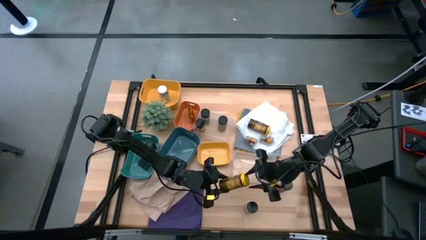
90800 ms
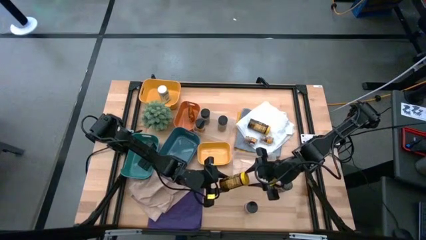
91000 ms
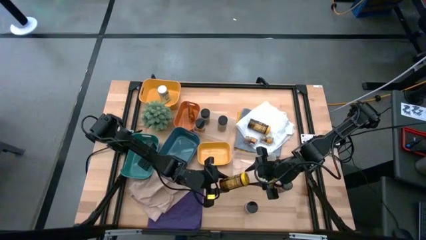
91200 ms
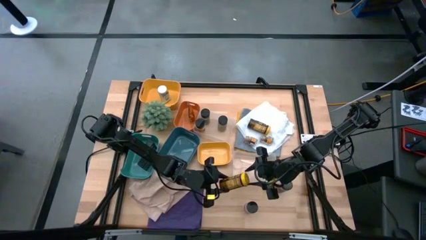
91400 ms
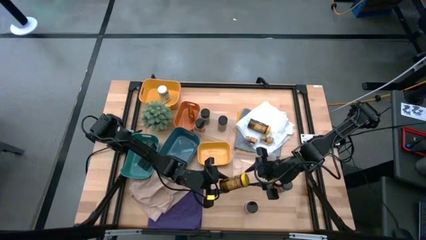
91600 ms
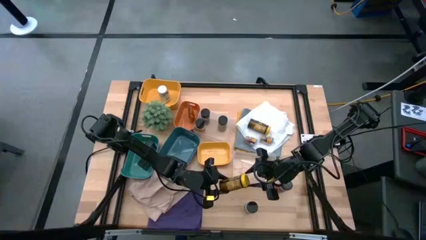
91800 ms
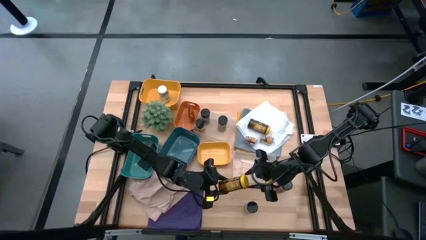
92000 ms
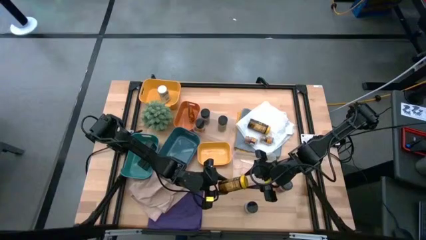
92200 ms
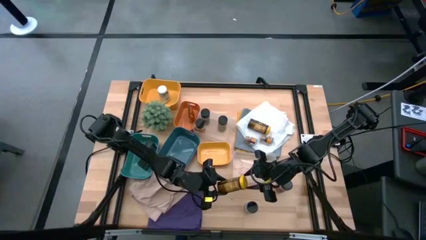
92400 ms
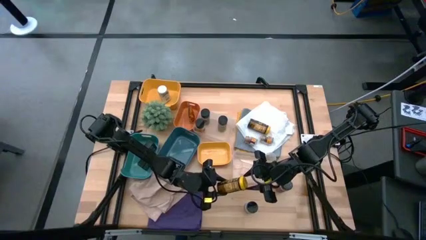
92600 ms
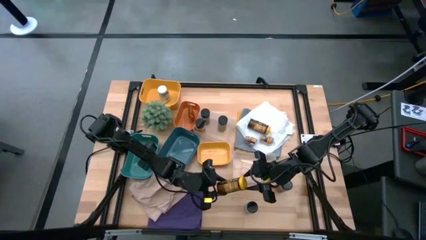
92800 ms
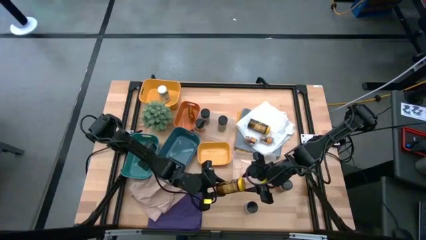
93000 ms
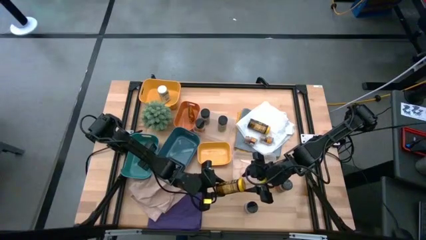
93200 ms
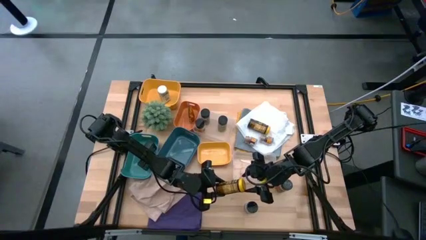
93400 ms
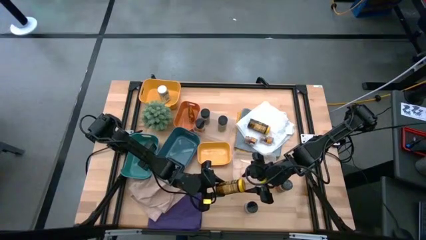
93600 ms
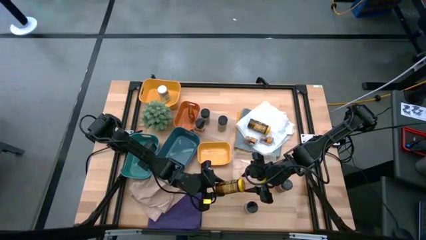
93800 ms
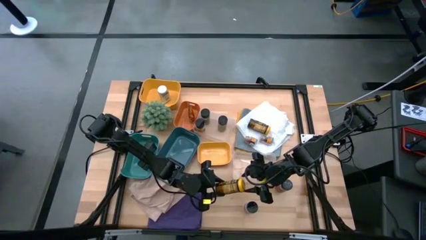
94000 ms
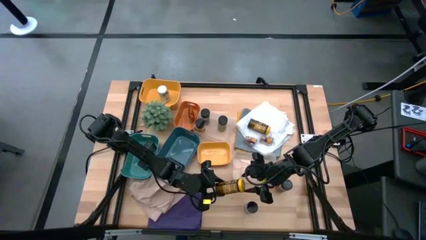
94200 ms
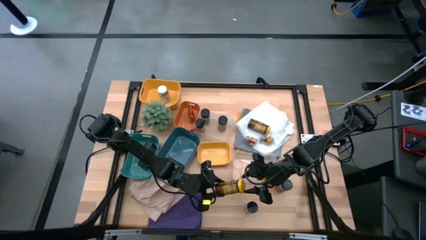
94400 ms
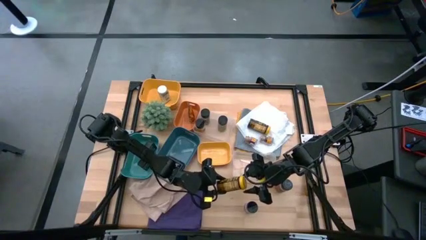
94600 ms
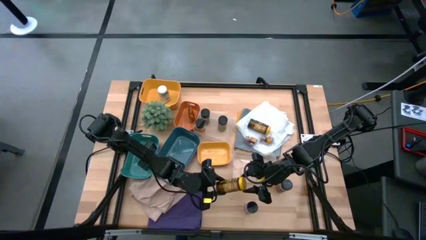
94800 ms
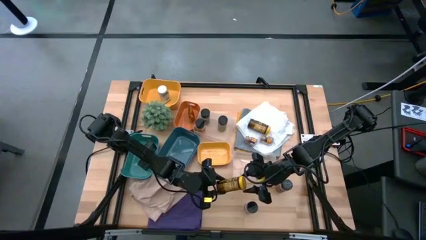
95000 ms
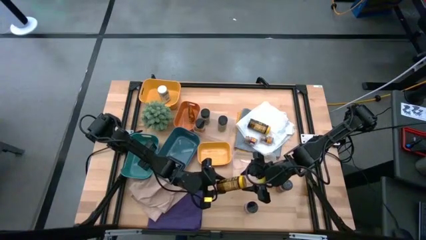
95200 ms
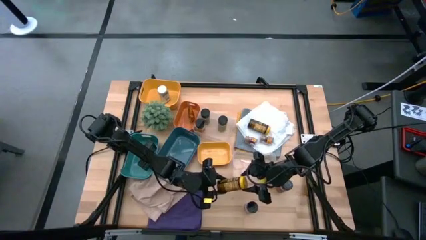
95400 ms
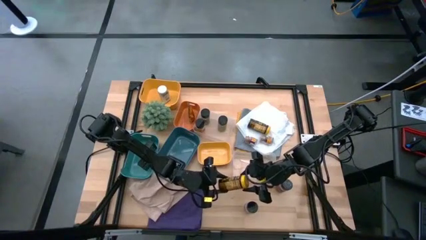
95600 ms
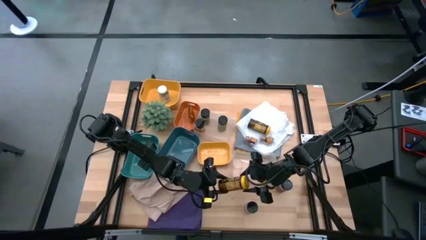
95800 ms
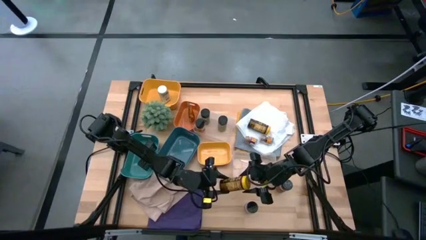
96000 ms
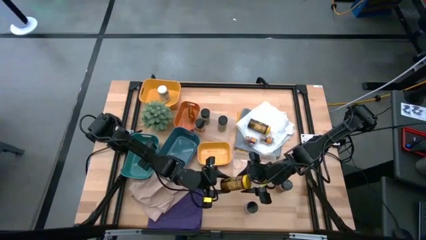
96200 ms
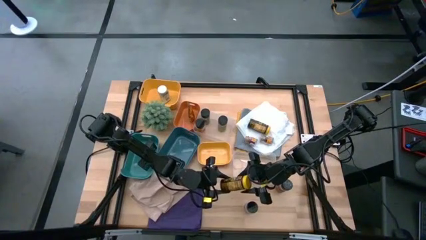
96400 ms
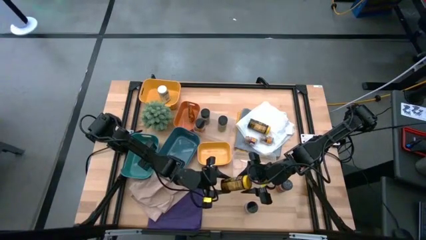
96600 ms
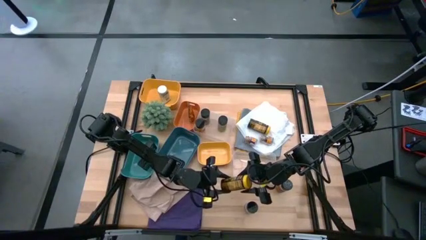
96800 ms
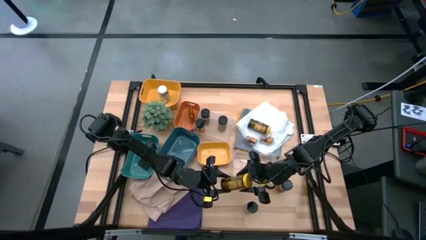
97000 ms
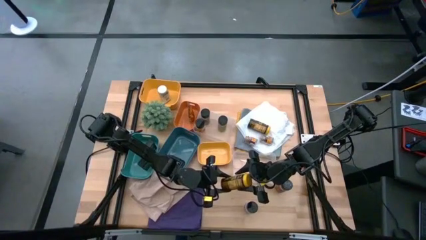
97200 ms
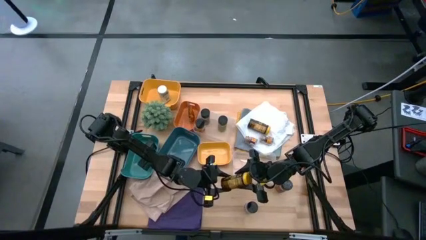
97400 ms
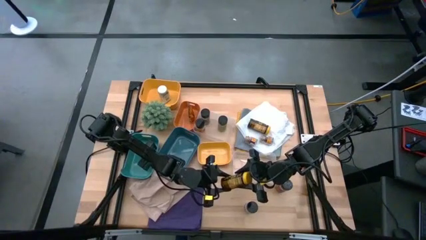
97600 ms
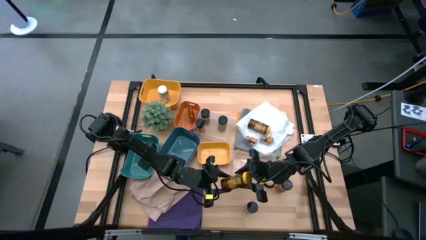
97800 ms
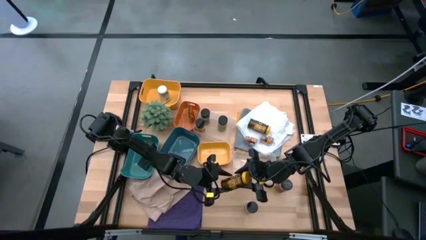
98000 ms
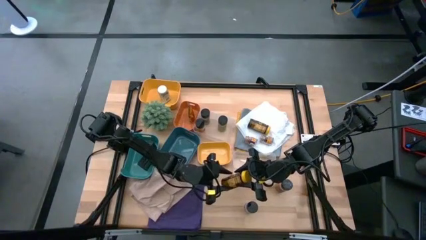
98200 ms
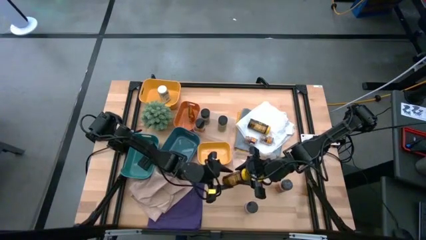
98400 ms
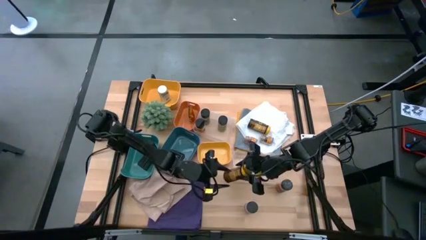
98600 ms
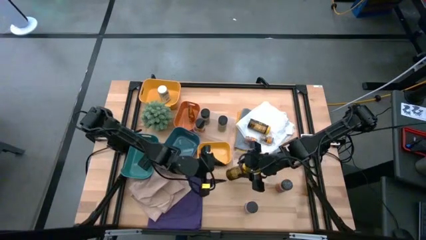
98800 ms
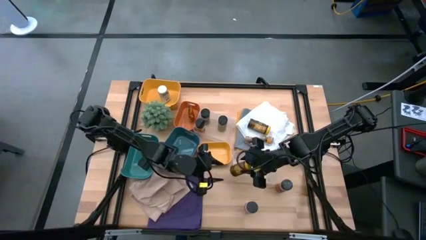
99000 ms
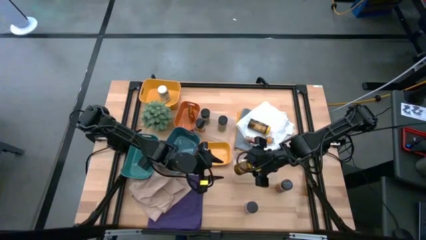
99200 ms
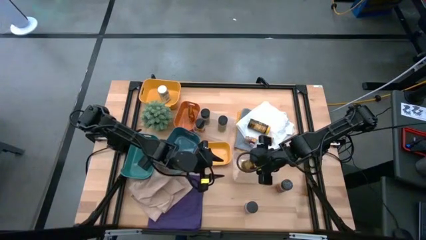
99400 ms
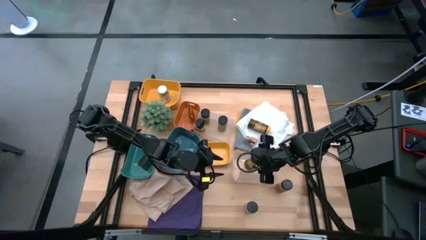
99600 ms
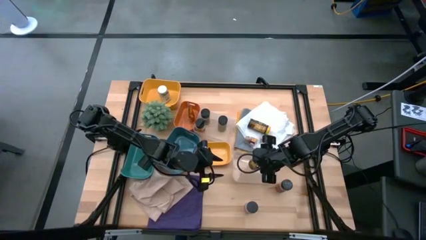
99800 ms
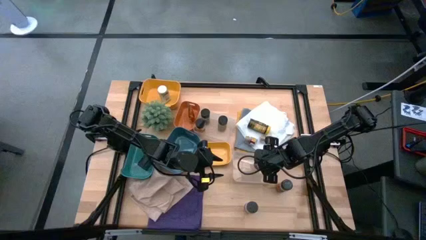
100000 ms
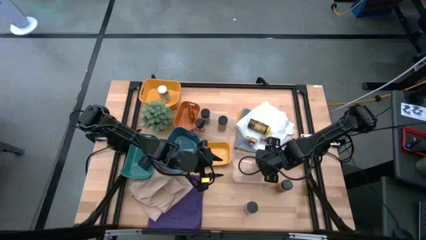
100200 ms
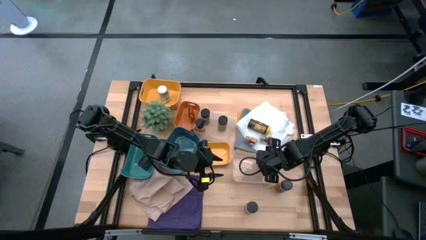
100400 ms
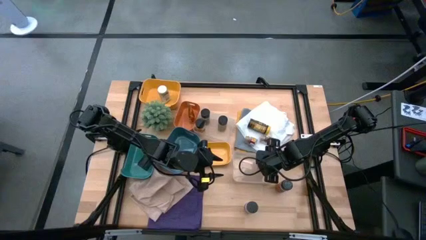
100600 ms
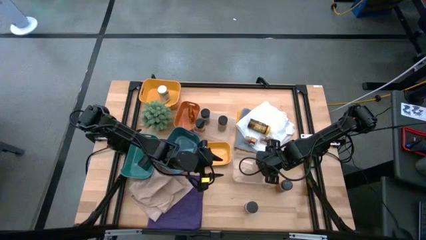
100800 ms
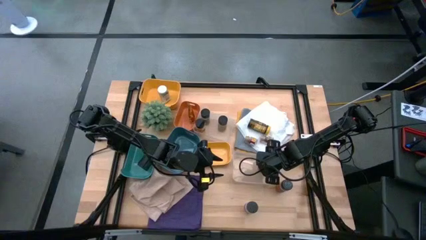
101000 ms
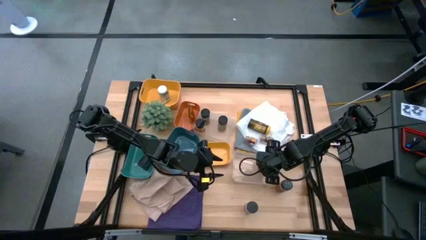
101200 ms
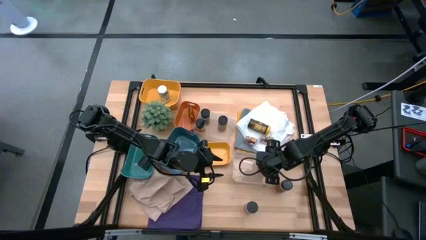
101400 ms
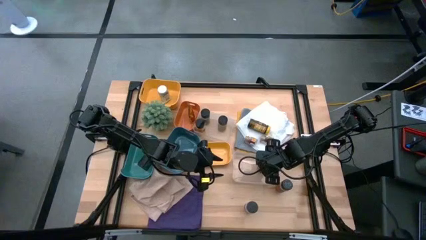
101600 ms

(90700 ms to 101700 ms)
Task: Sort spices by type
Put the bottom yellow seasoning bottle into the bottom transparent bin

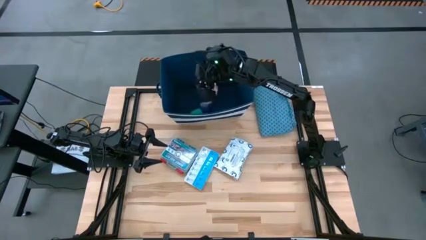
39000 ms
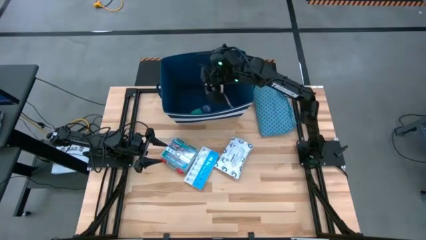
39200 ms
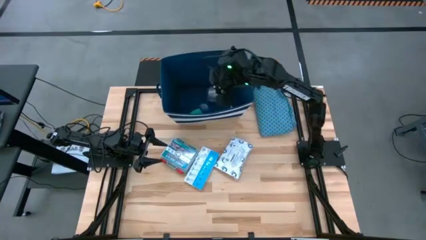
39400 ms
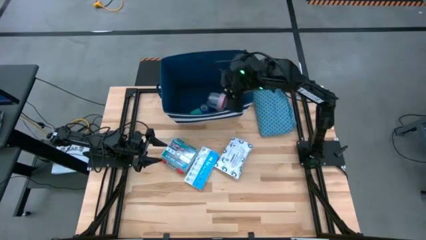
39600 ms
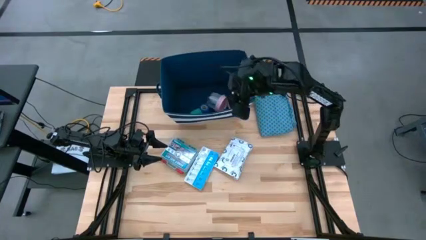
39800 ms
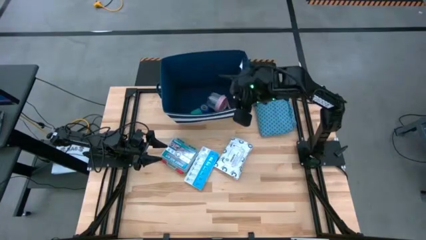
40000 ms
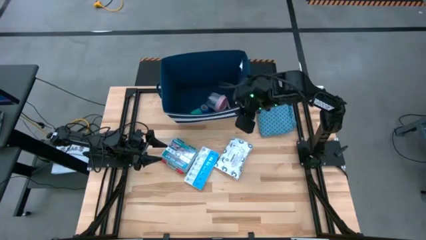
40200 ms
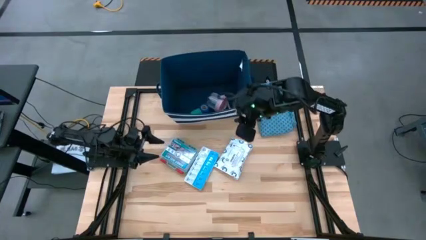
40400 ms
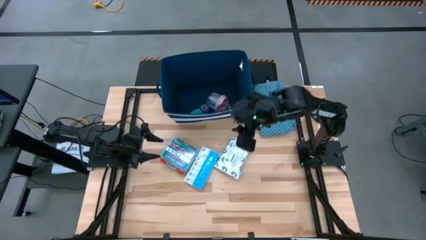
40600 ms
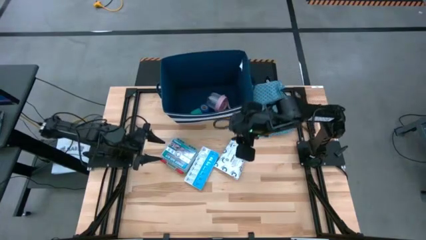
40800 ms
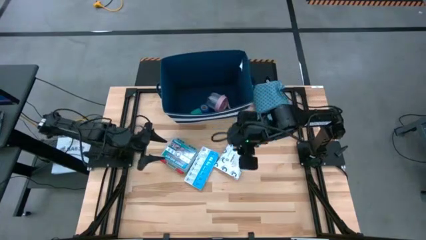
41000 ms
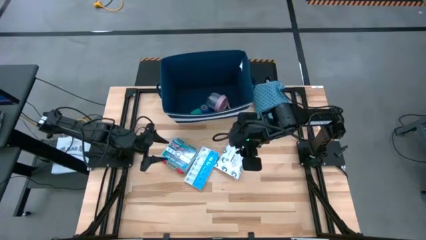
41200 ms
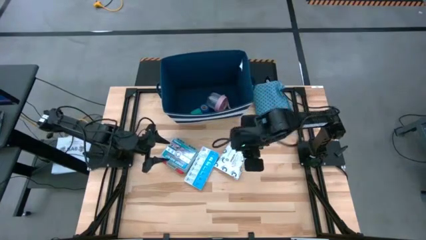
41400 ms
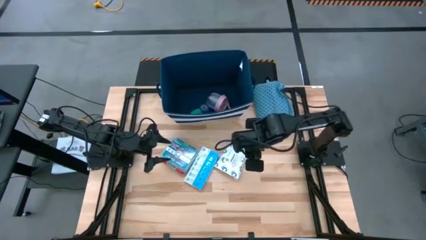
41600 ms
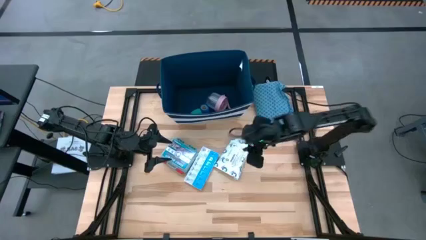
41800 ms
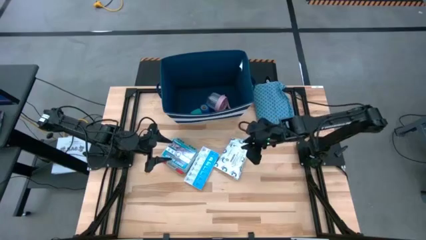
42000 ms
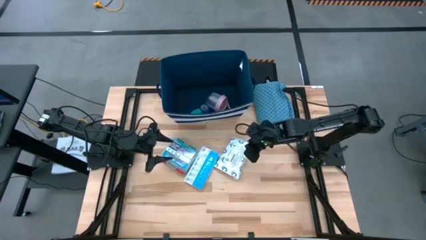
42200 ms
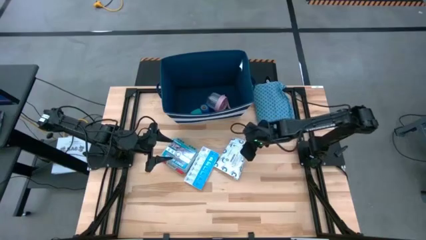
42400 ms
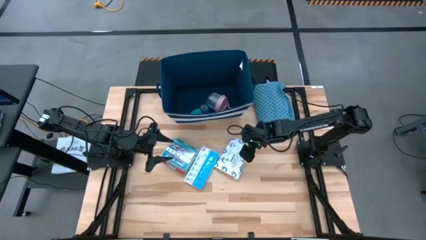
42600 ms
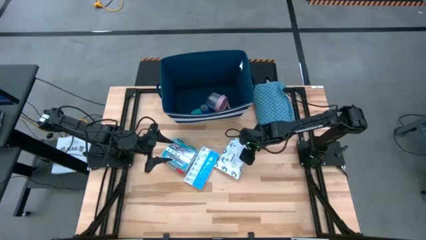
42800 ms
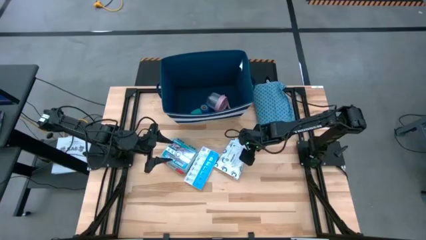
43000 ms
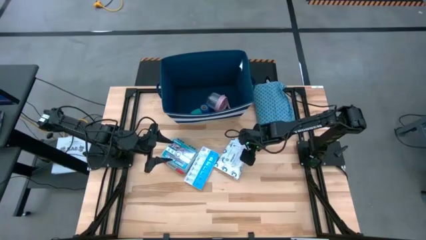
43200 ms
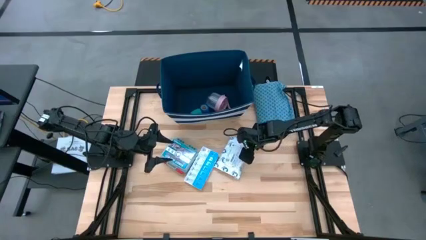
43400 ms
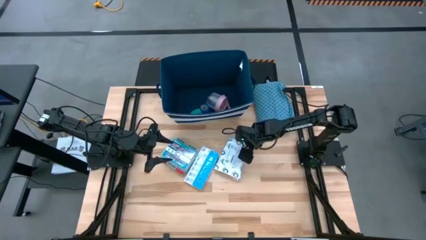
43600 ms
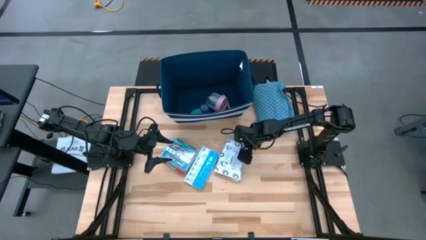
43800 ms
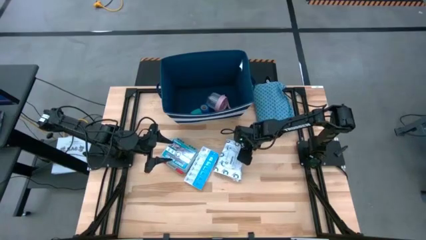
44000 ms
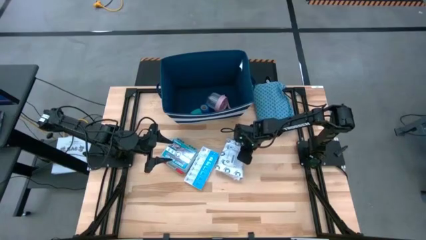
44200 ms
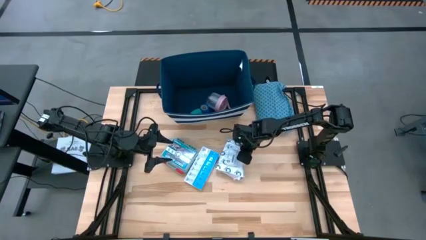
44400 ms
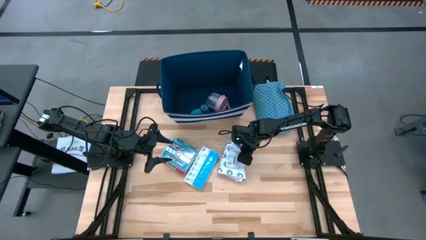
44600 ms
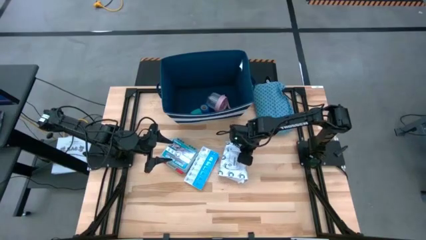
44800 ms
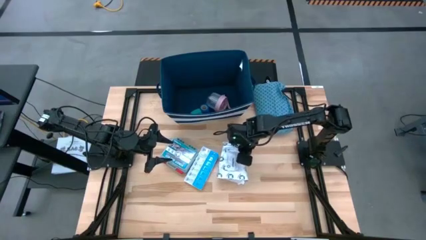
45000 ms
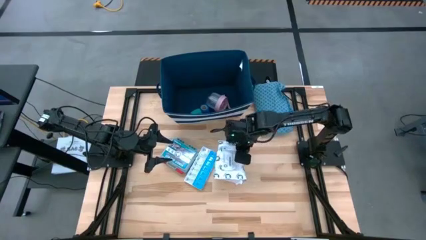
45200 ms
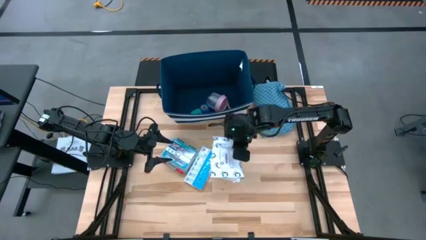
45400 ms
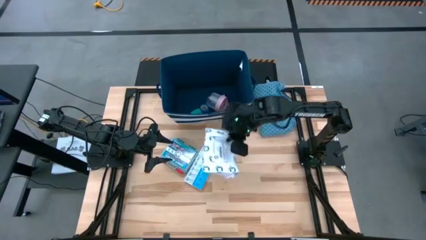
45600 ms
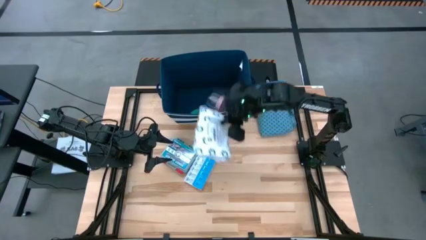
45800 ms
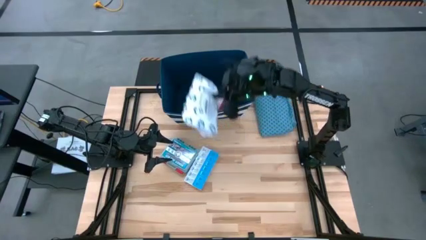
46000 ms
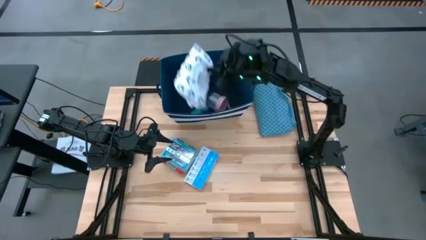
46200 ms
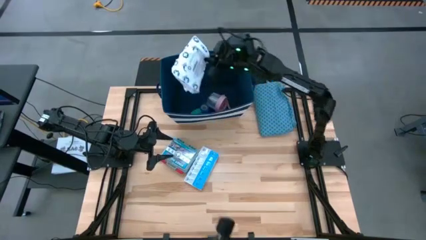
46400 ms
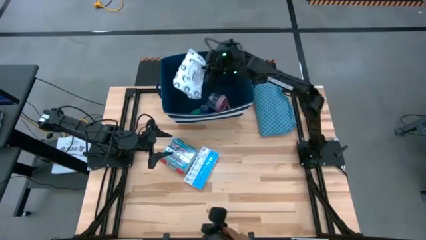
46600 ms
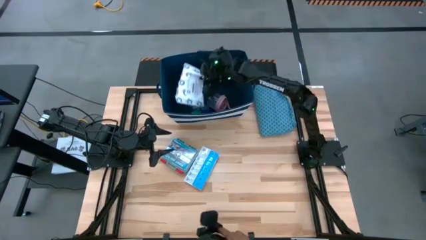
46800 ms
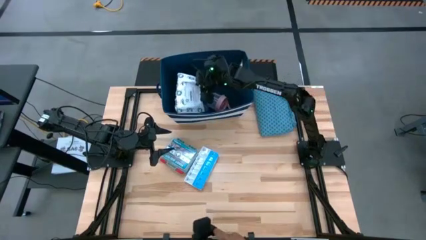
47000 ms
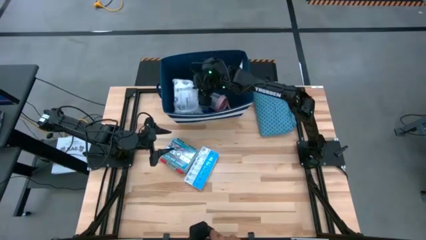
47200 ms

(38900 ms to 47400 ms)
Task: Pack medical supplies into shirt
Put the white mailer bag into the blue patterned shirt
